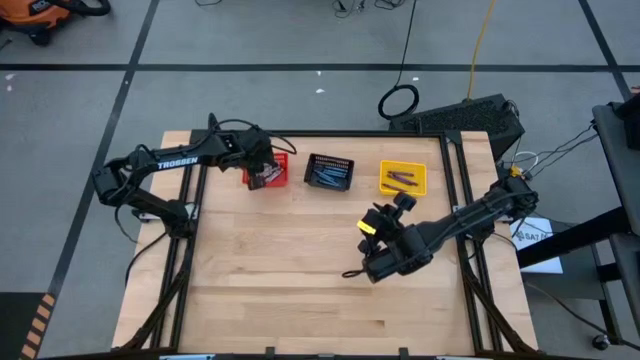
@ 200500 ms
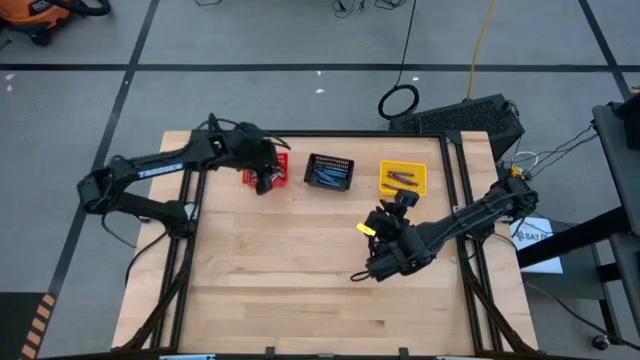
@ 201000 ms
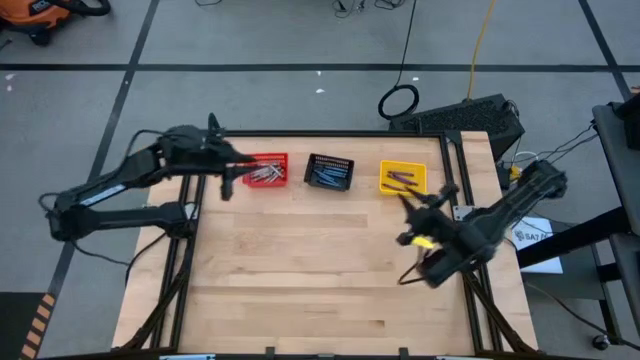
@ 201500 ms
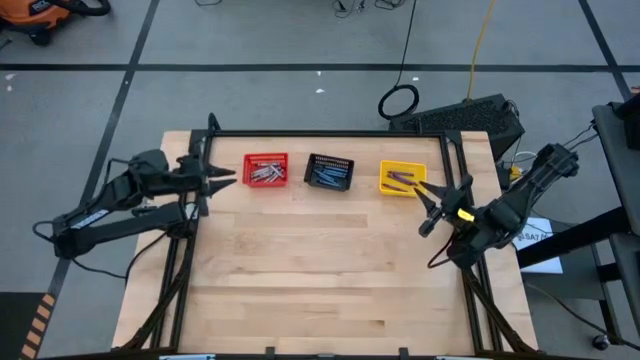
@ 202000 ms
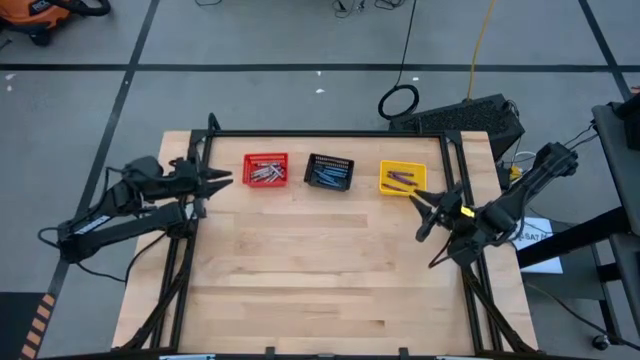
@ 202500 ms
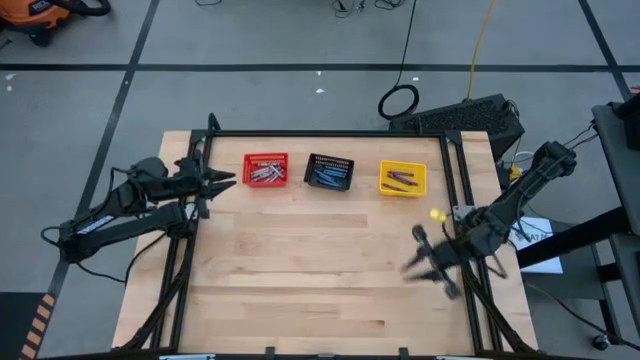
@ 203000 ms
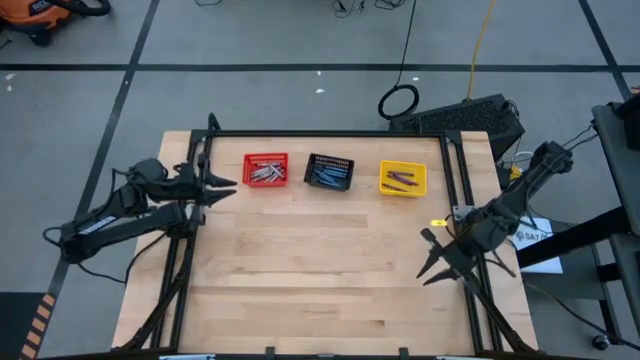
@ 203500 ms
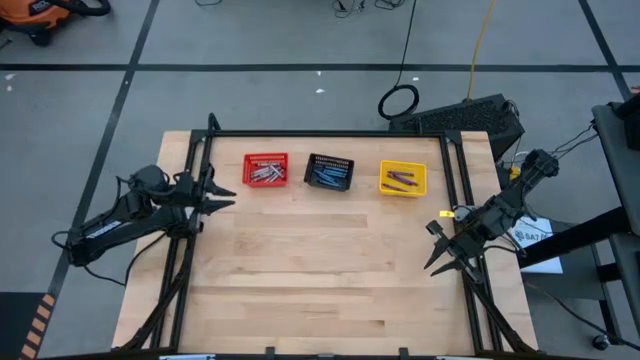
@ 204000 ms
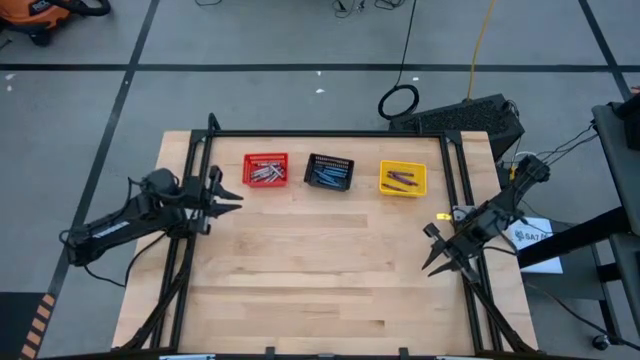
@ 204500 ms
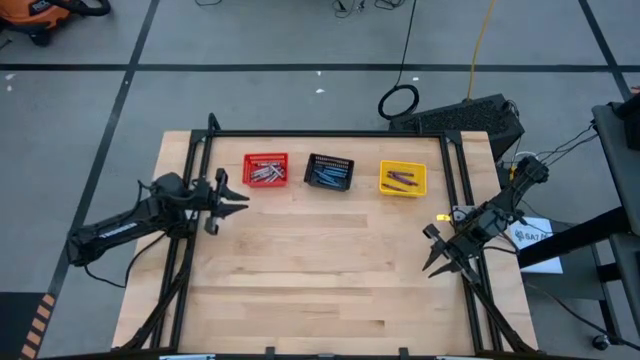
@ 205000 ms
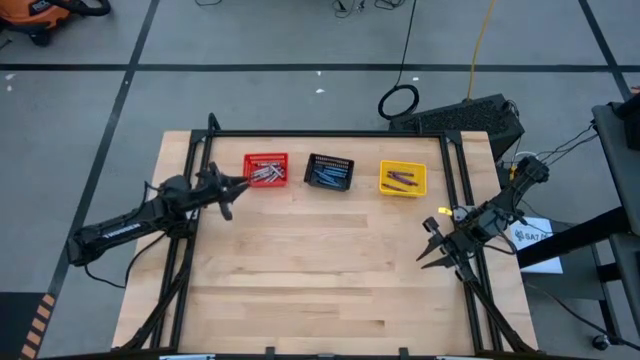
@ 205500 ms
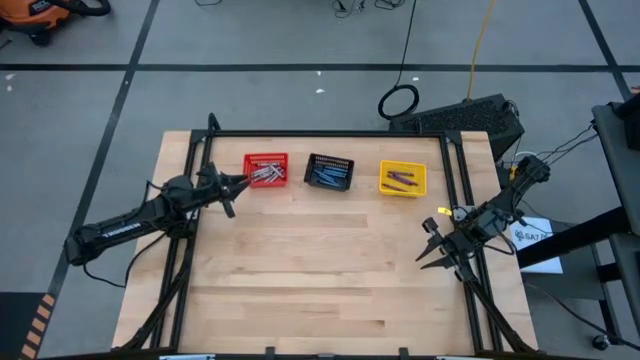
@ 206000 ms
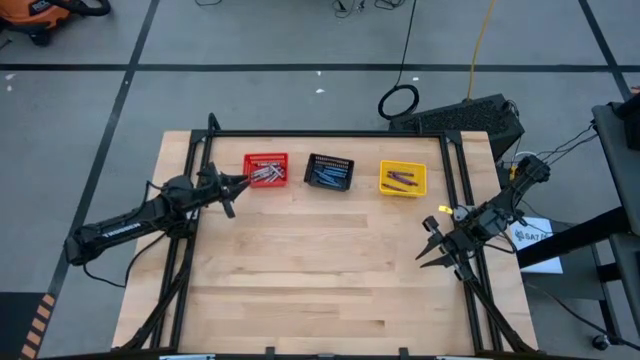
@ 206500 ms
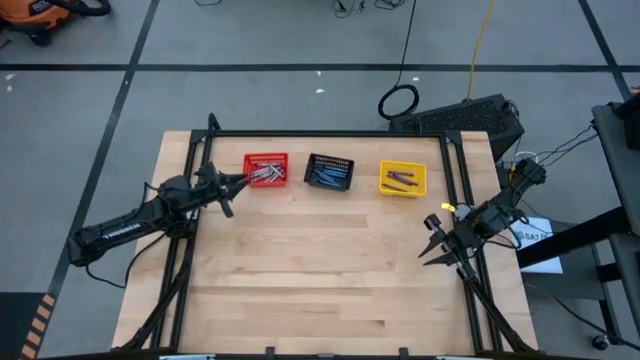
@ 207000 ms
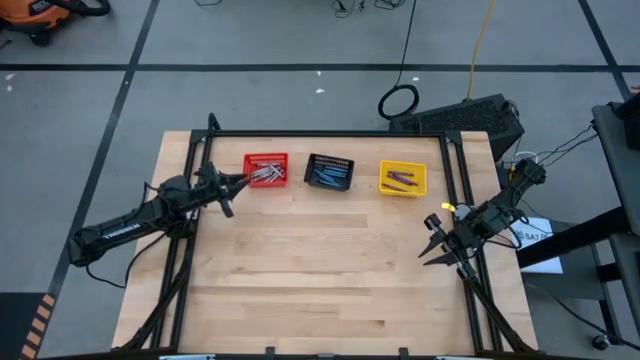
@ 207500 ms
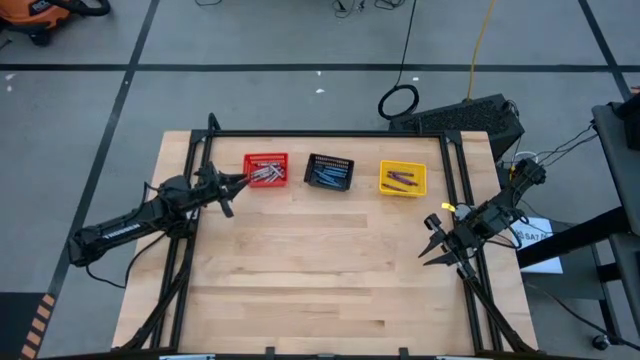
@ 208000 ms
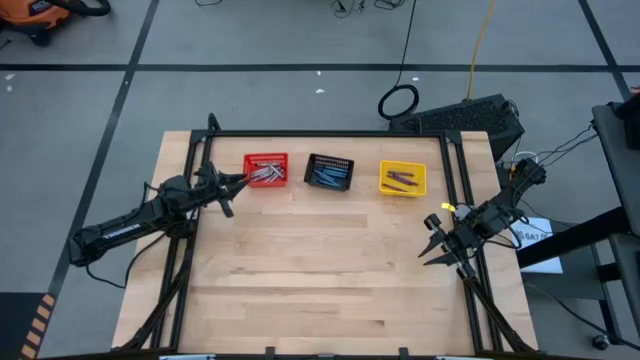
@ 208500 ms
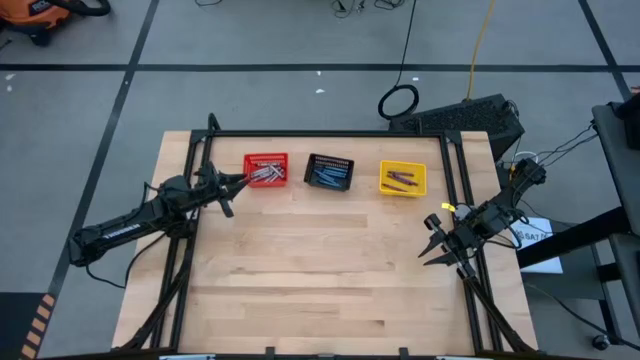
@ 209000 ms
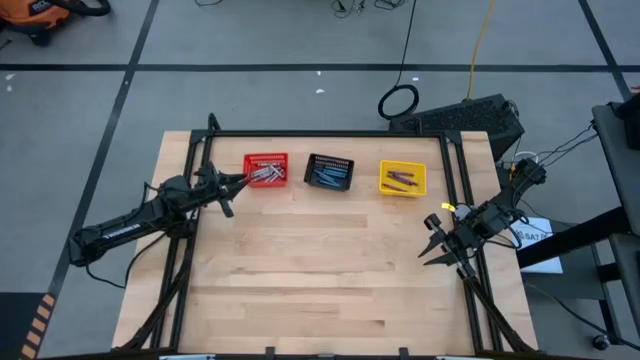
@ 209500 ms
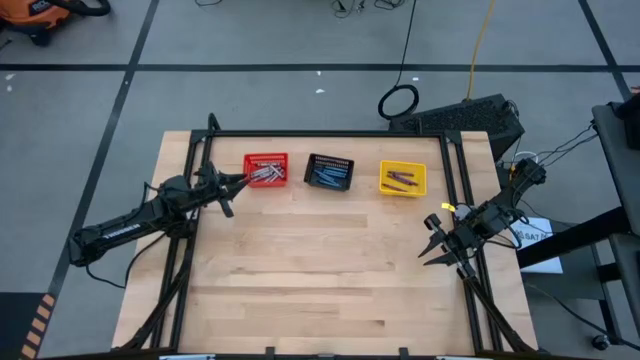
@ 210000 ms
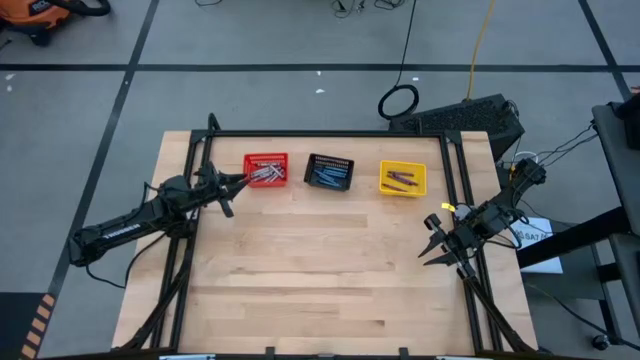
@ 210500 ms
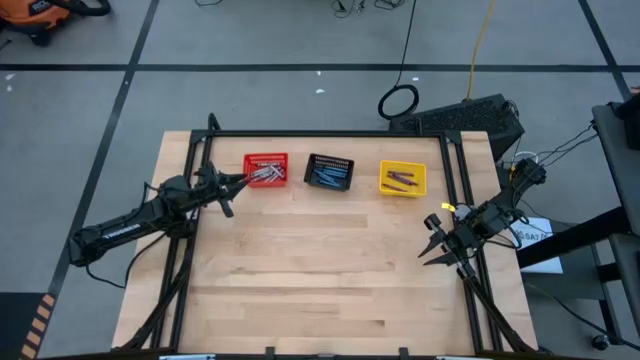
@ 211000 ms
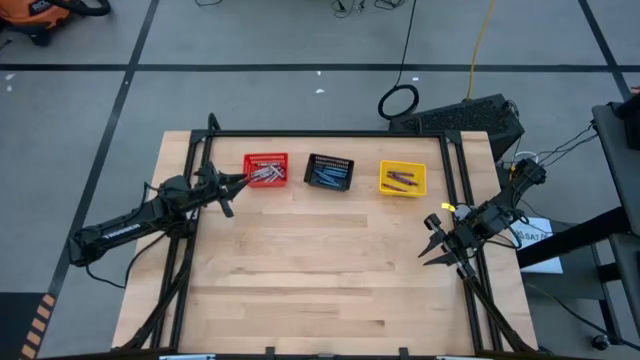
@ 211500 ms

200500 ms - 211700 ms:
Task: Sort crayons
Return to Home Position

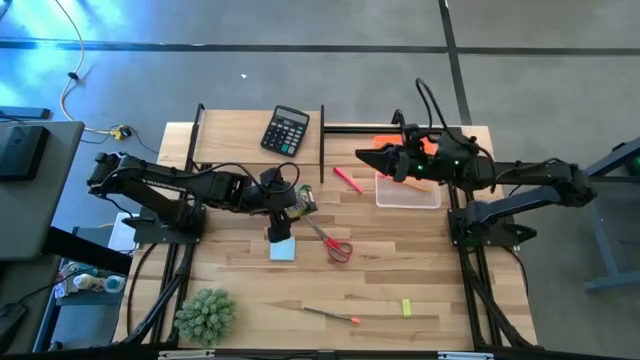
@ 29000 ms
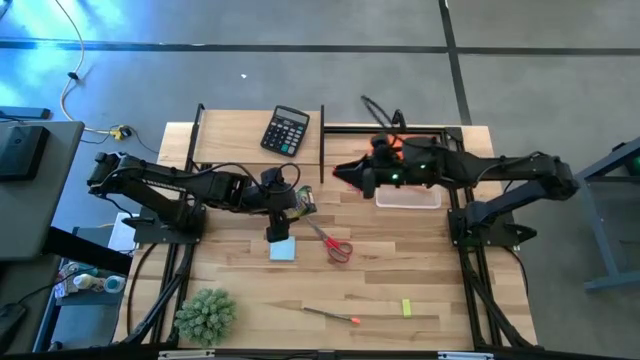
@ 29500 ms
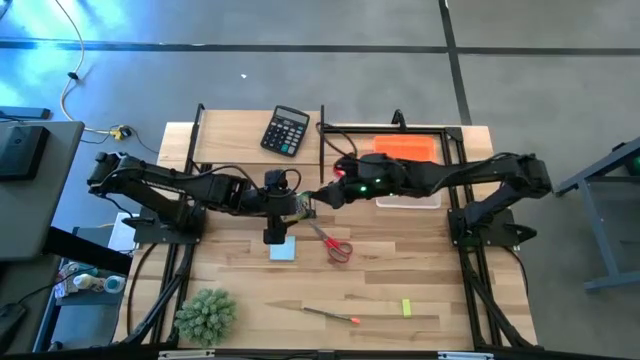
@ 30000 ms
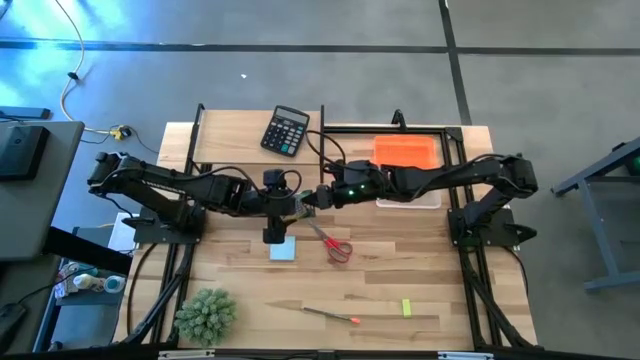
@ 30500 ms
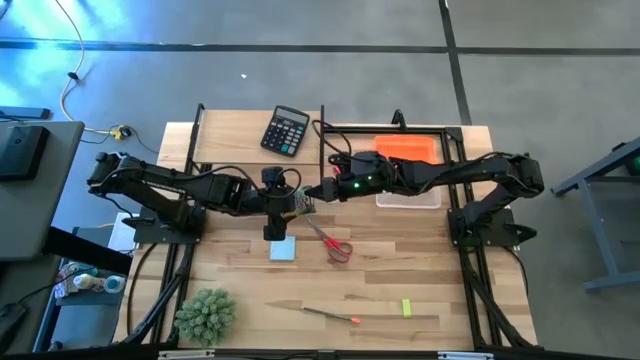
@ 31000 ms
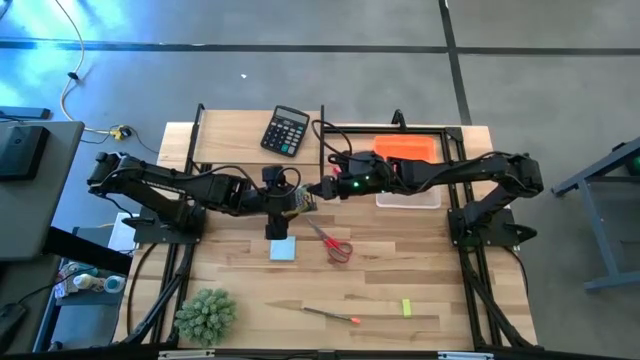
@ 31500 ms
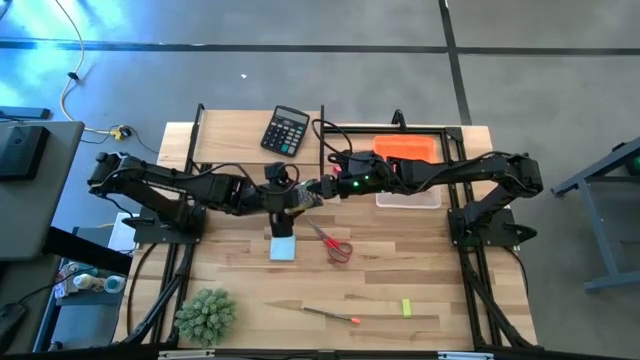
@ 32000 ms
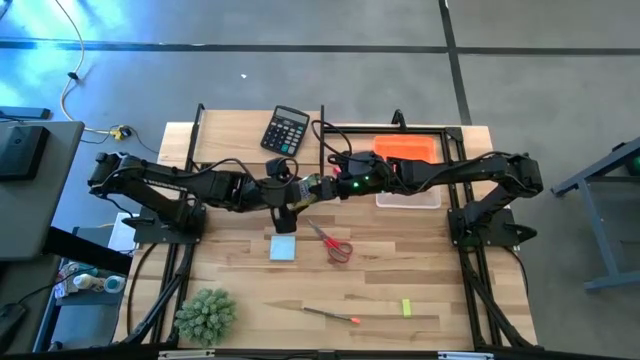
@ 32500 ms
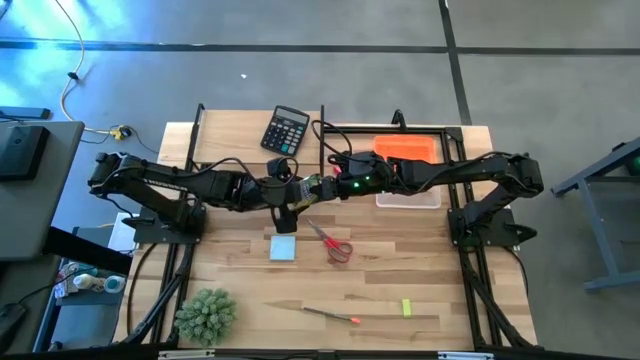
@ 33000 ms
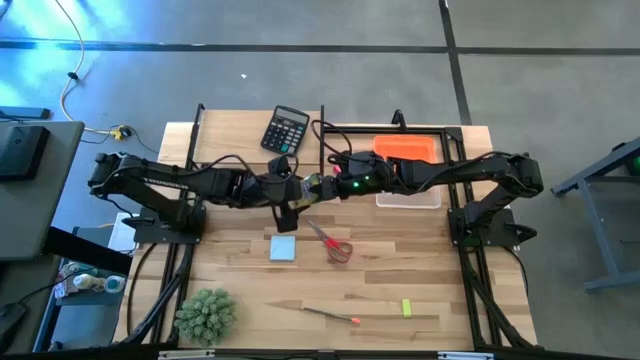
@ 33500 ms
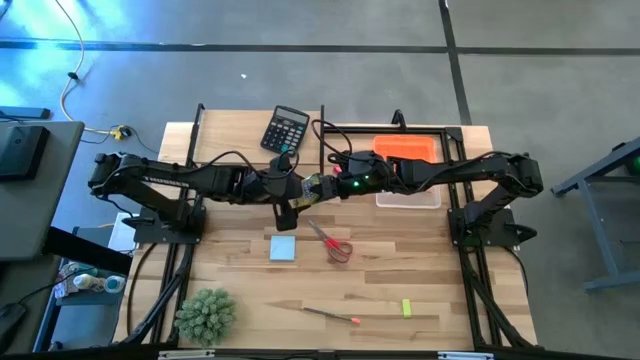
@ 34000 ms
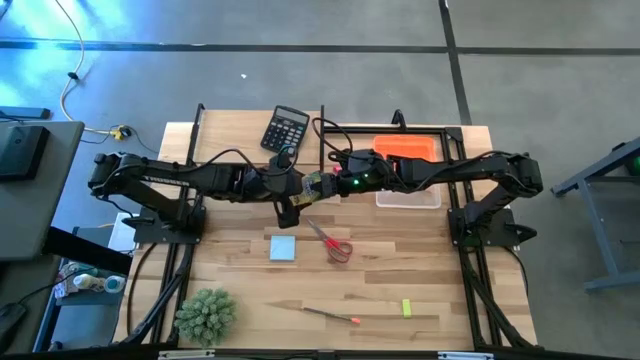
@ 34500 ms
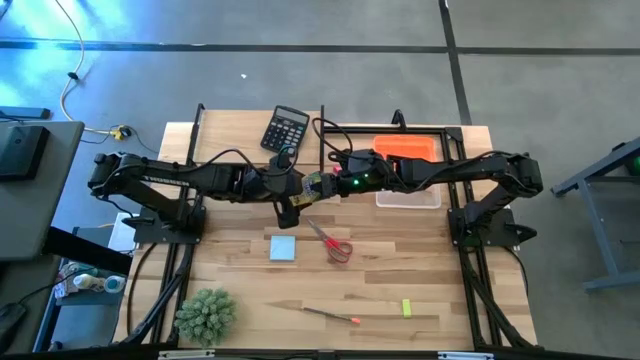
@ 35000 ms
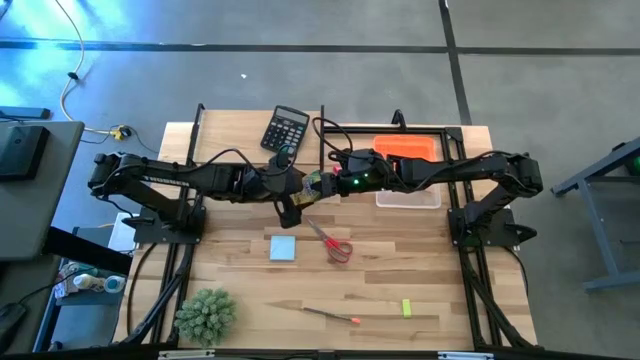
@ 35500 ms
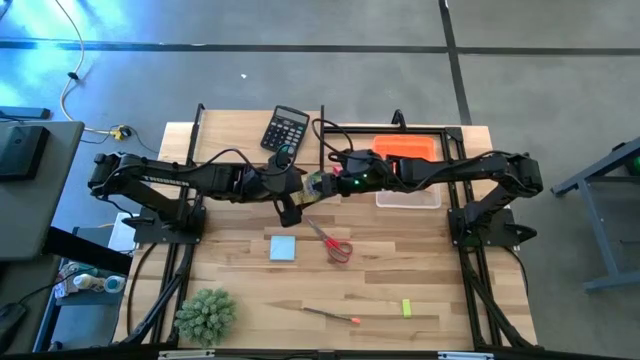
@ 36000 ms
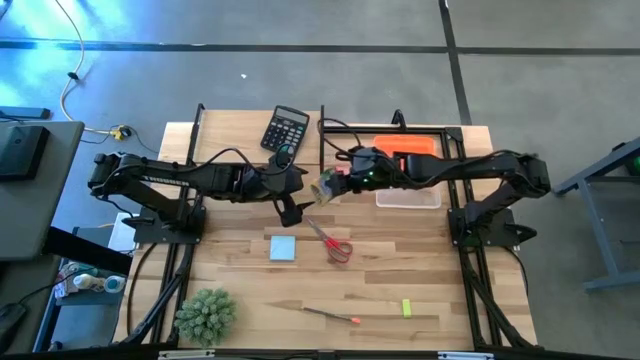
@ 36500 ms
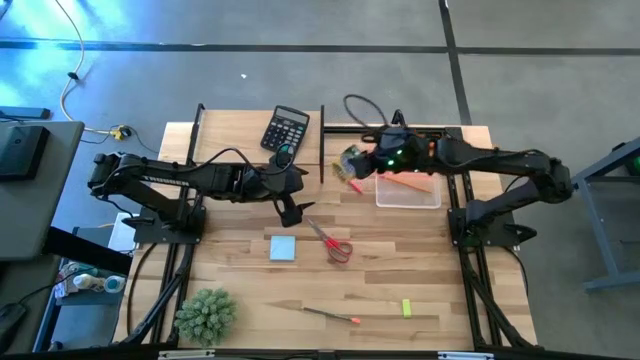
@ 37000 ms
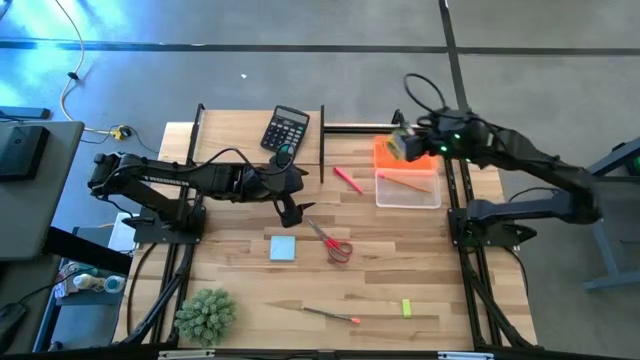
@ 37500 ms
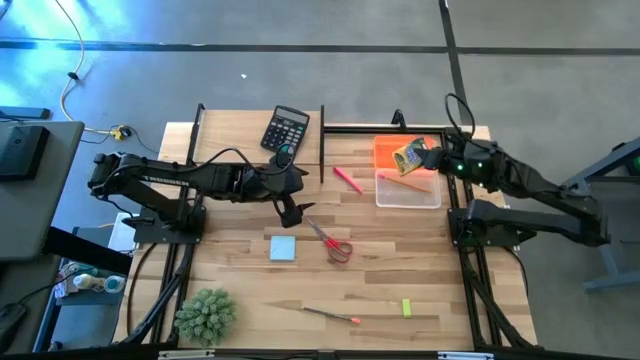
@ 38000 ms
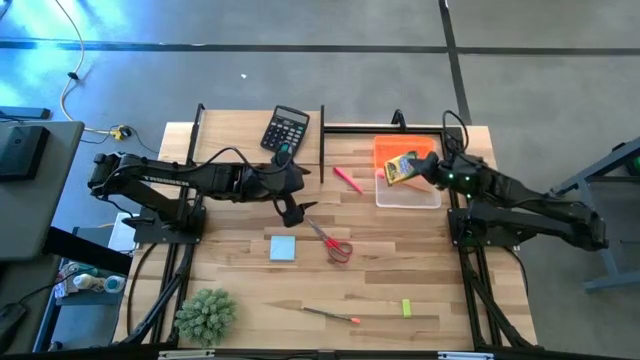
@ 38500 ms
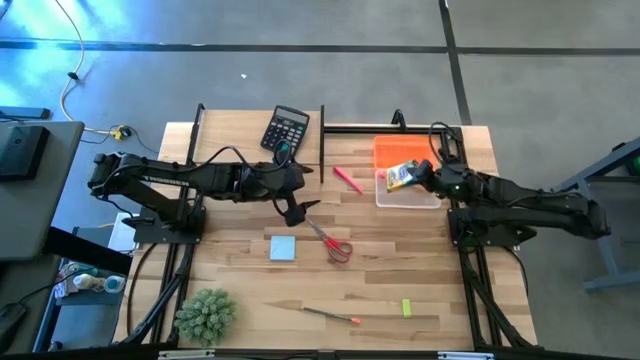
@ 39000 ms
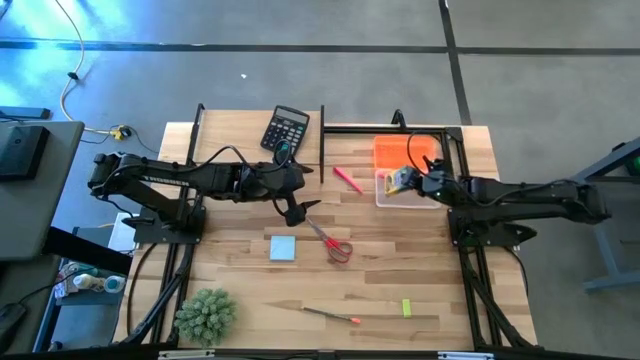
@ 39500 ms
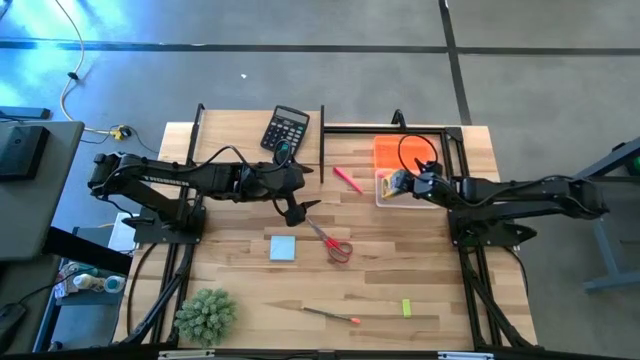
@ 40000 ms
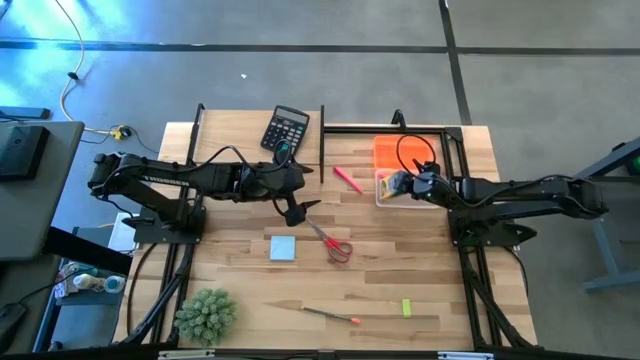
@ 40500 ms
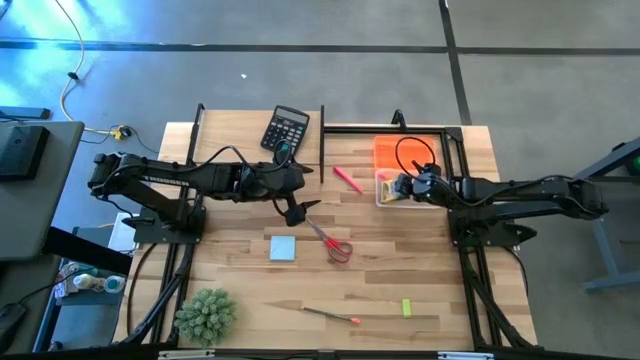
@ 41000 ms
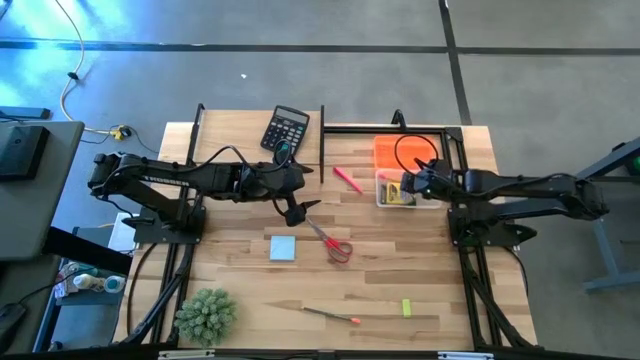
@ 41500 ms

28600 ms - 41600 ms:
Task: Pack school essentials
Put the yellow crayon box into the orange supply box
